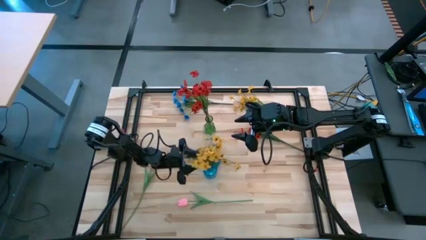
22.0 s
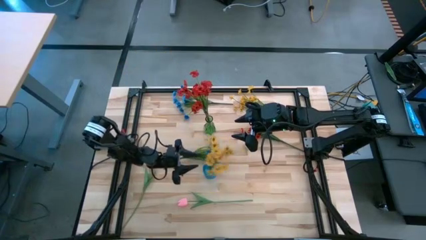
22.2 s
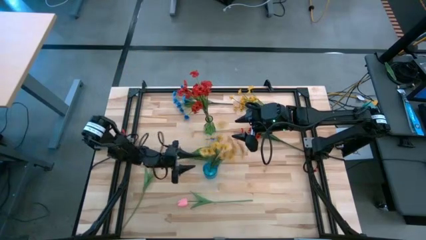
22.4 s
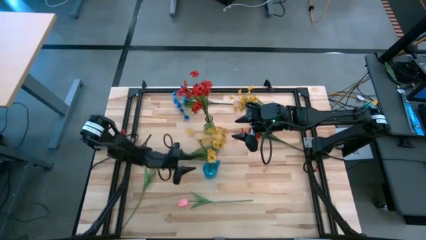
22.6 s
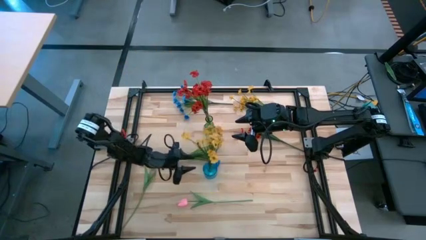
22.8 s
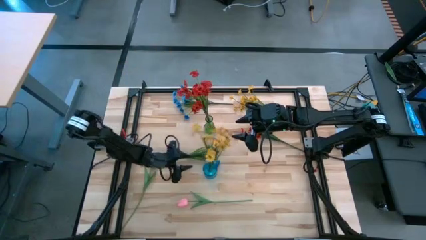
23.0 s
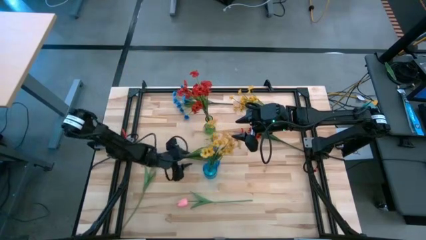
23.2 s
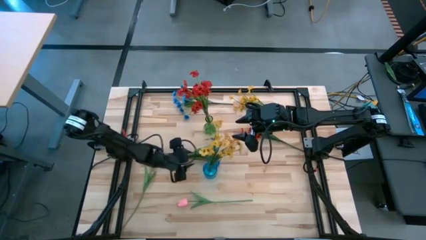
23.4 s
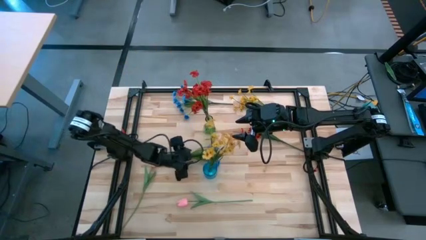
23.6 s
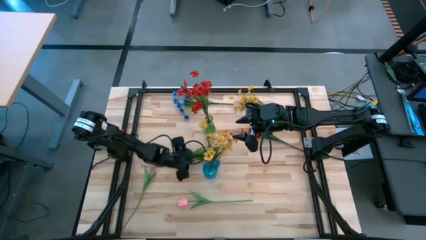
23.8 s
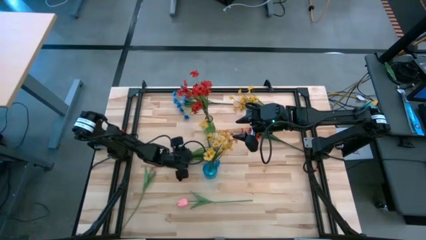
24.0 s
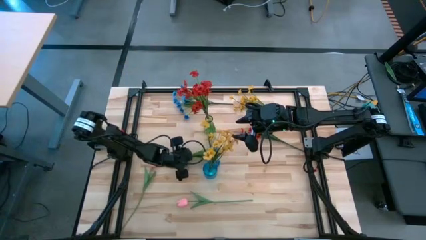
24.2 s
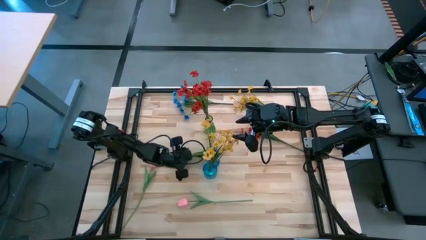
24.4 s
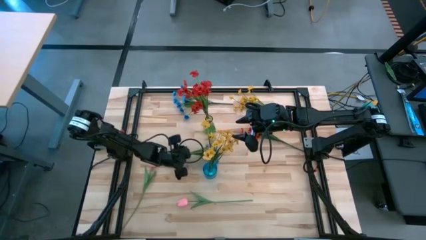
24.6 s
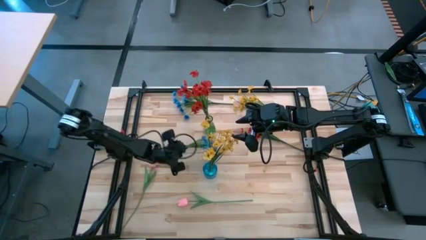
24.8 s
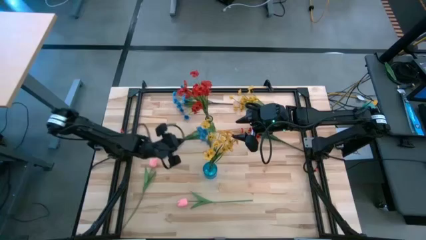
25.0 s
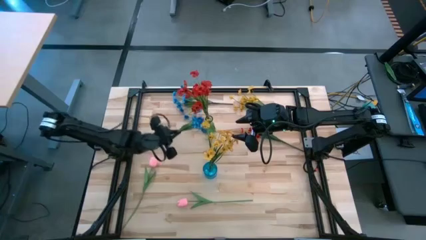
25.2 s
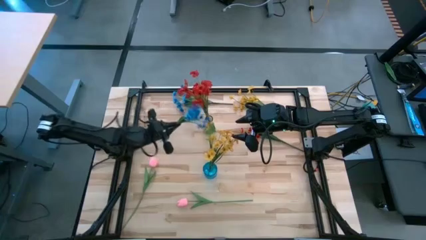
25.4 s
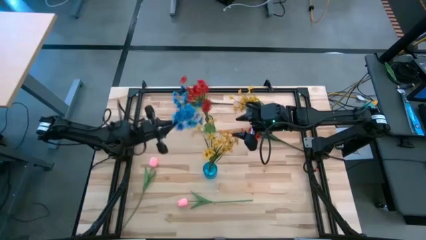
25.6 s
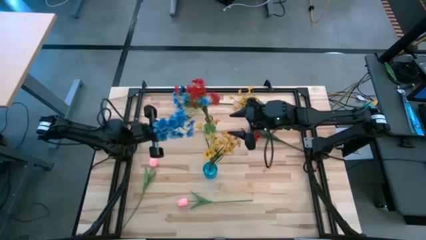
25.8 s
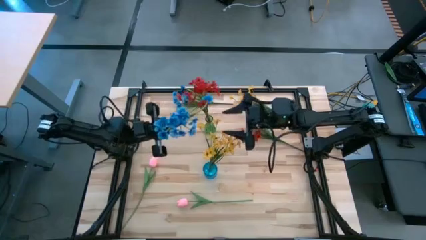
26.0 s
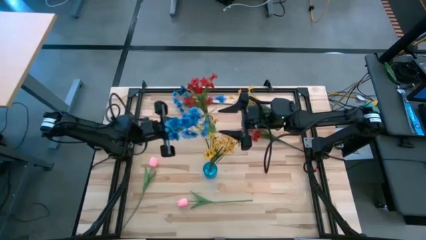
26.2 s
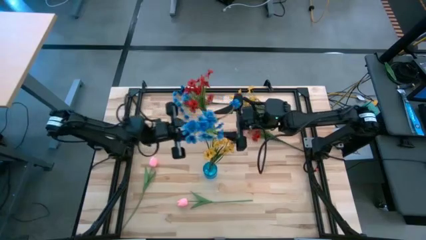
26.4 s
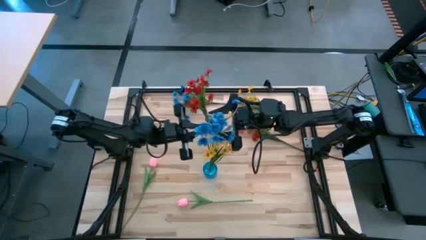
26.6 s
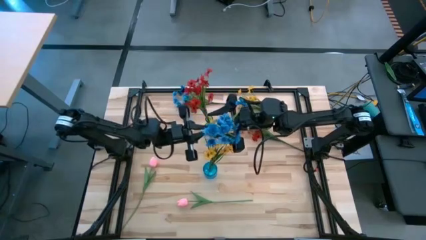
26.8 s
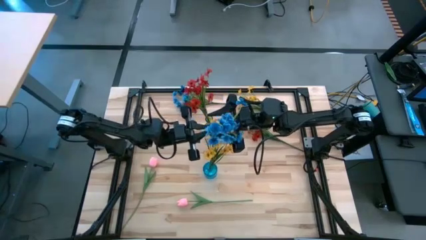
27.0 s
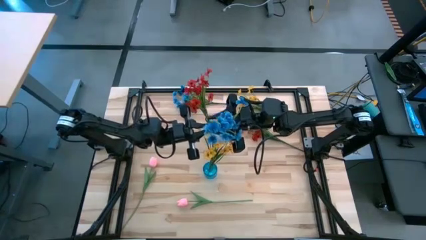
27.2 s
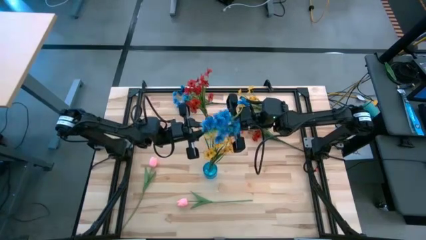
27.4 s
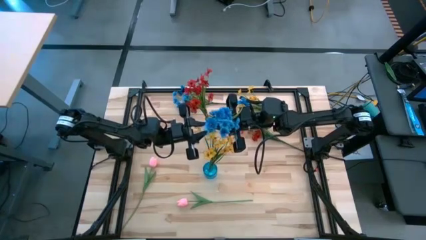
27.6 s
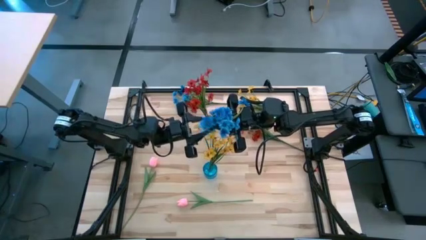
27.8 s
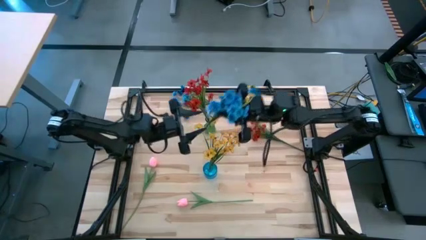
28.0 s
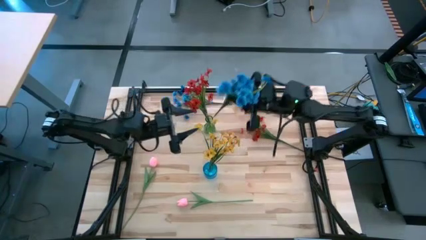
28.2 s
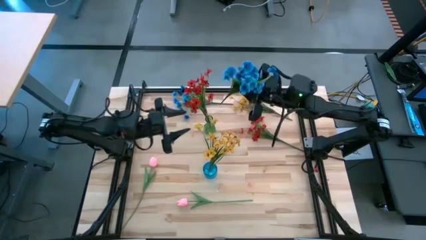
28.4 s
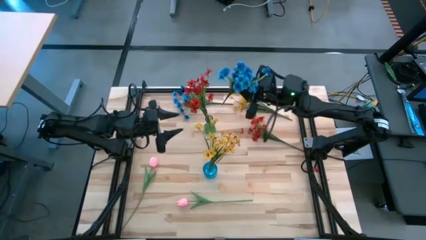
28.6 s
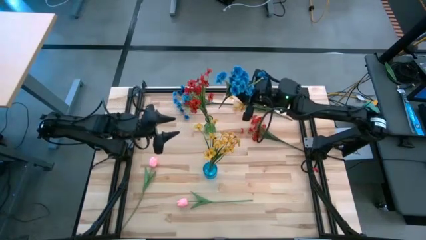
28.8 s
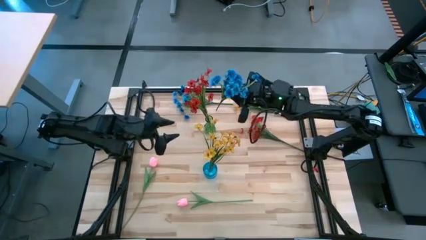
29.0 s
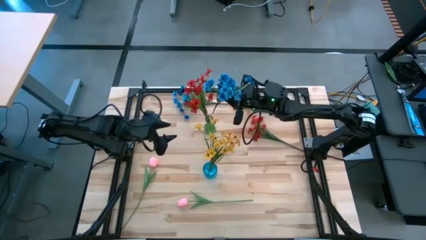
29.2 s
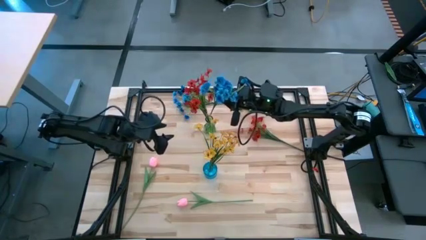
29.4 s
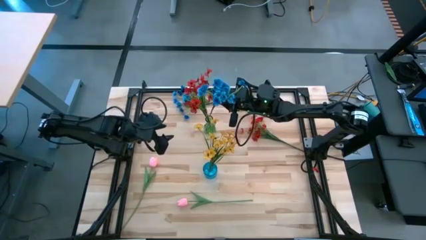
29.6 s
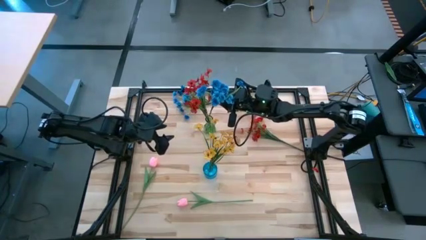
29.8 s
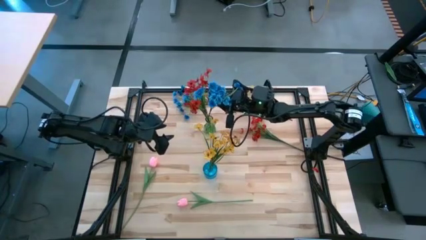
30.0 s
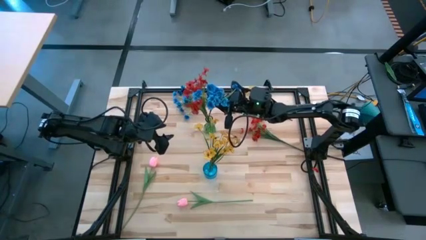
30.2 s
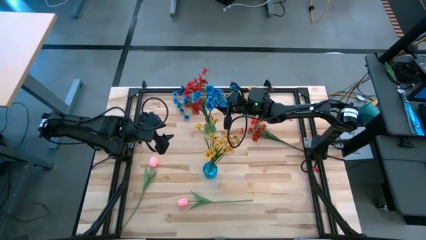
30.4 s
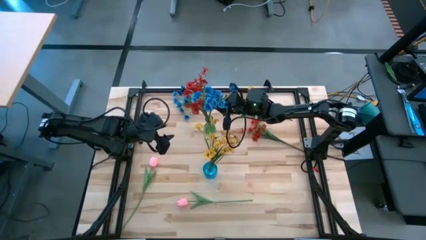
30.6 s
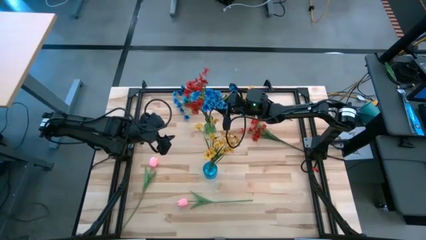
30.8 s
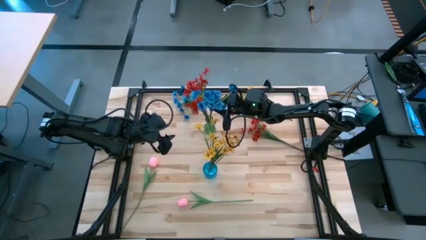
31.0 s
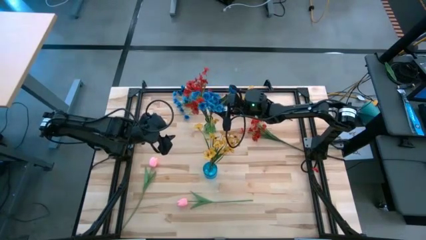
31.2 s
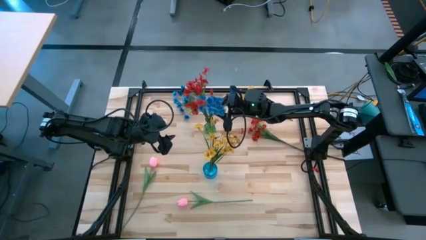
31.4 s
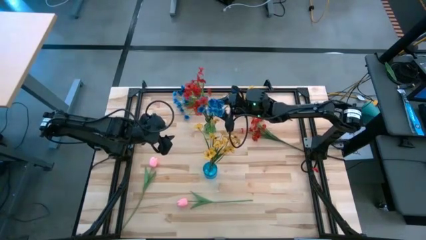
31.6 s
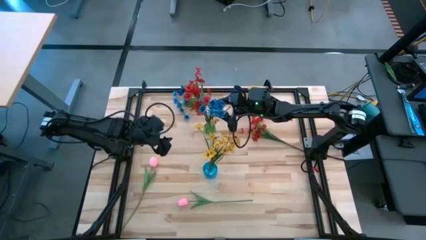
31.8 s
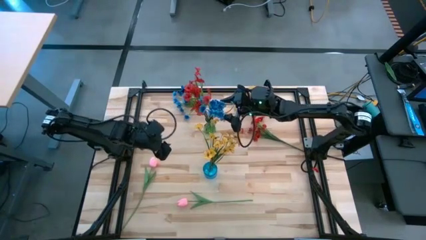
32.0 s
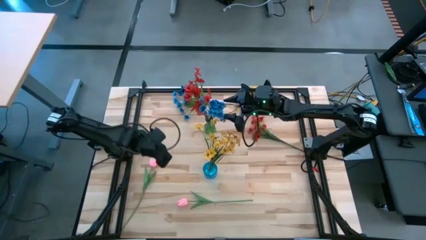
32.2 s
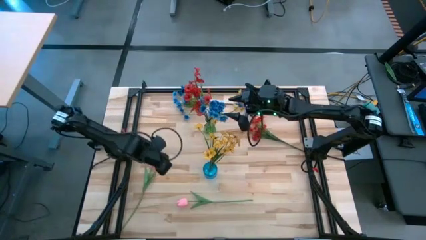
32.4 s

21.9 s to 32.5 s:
Task: Sort flowers into vase by color
Put the bottom blue flowers into the green vase
